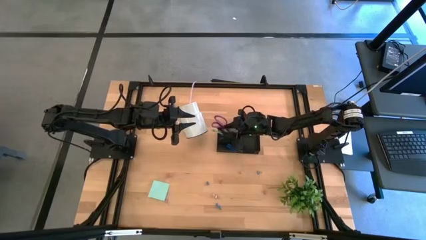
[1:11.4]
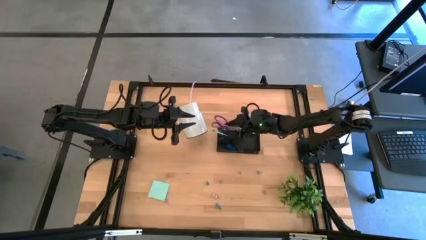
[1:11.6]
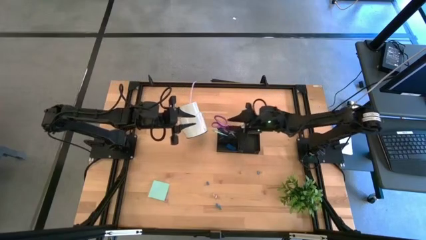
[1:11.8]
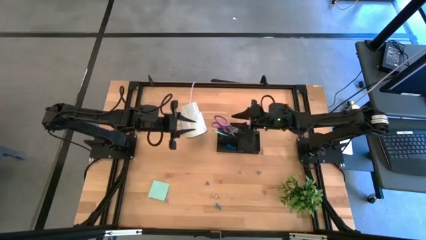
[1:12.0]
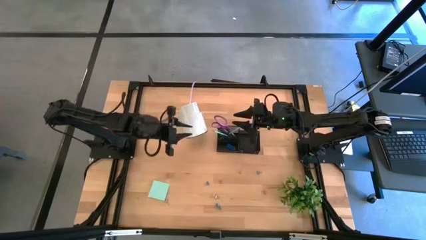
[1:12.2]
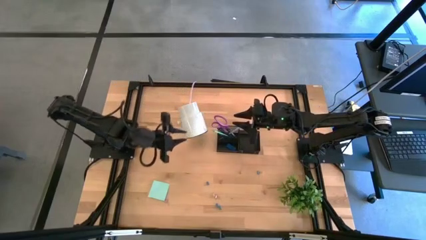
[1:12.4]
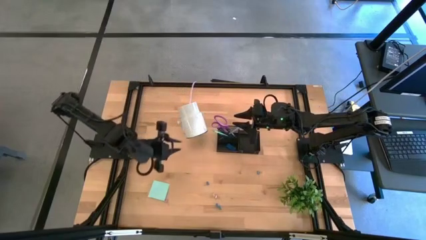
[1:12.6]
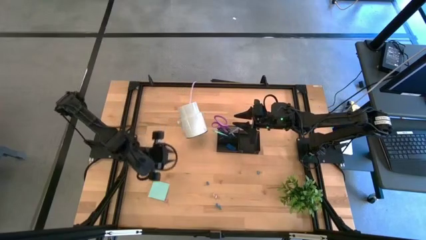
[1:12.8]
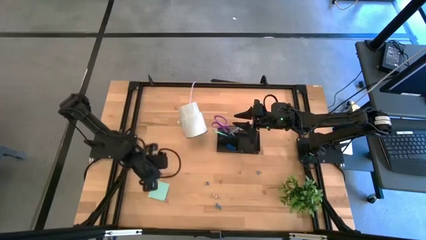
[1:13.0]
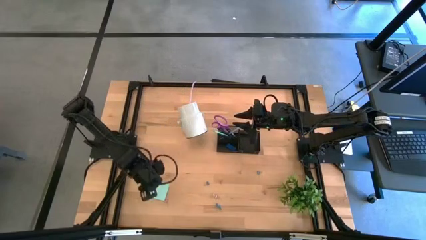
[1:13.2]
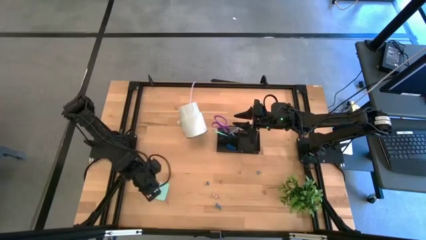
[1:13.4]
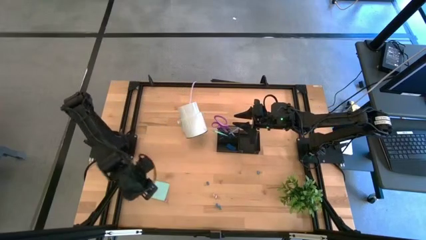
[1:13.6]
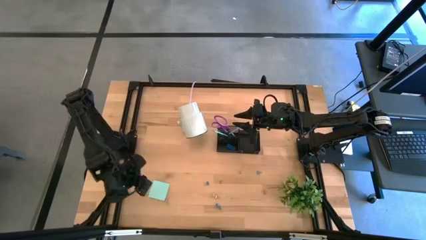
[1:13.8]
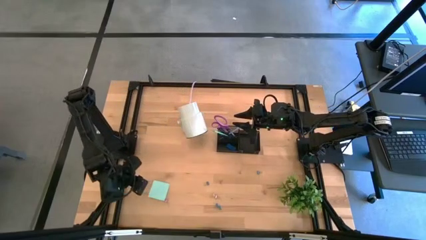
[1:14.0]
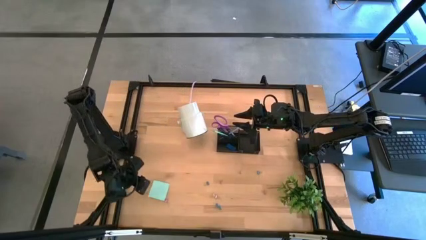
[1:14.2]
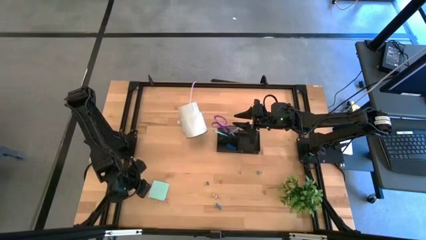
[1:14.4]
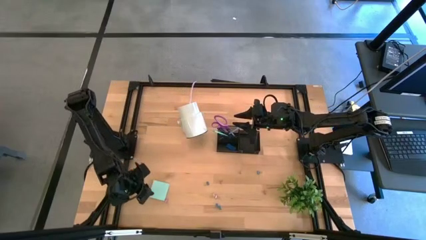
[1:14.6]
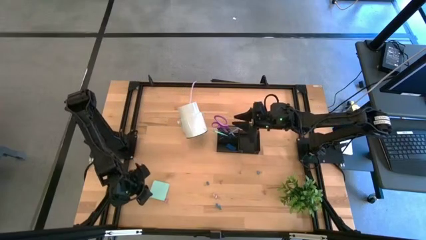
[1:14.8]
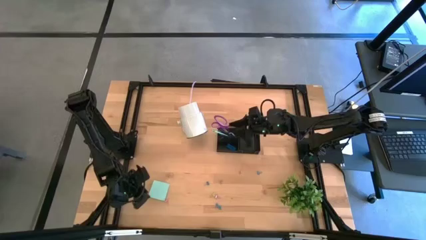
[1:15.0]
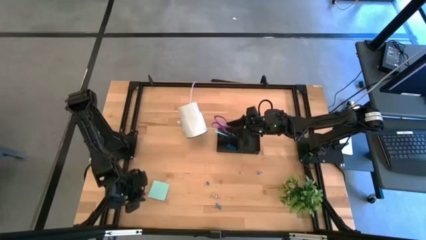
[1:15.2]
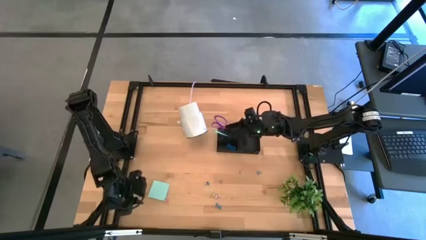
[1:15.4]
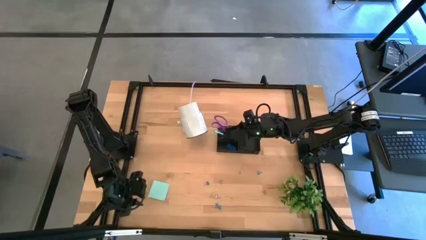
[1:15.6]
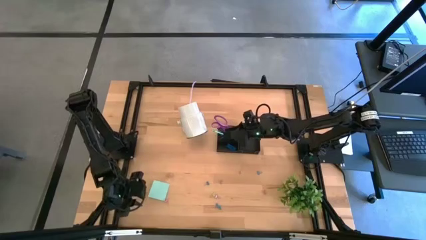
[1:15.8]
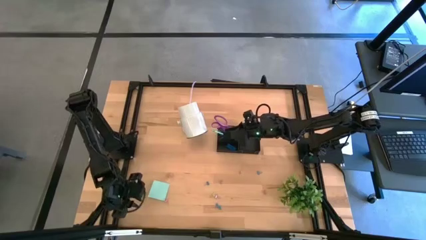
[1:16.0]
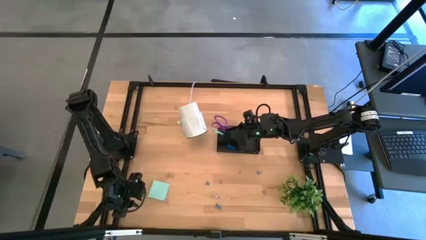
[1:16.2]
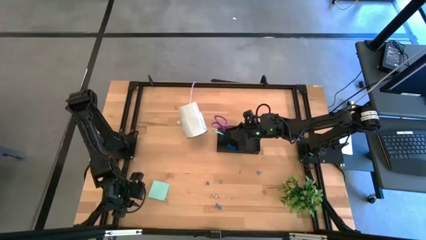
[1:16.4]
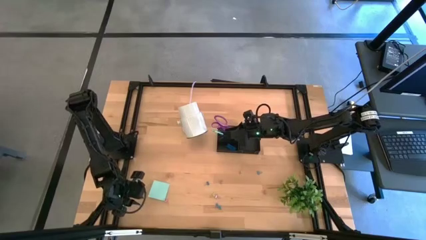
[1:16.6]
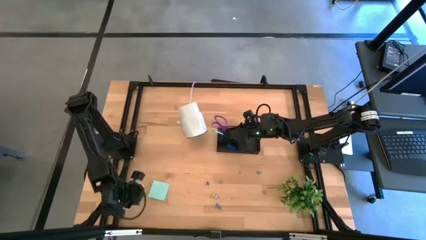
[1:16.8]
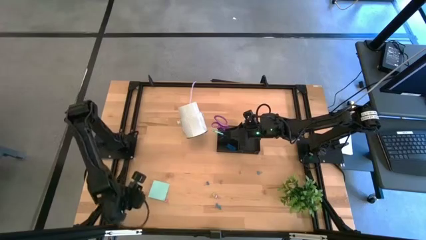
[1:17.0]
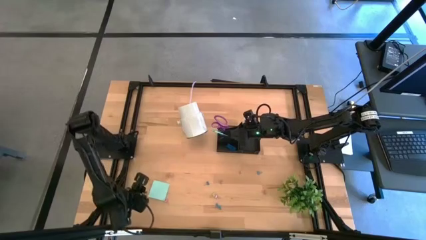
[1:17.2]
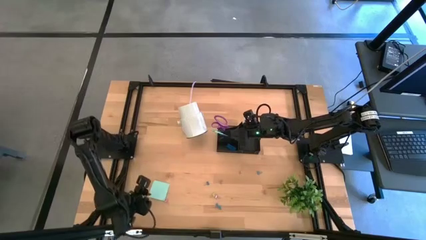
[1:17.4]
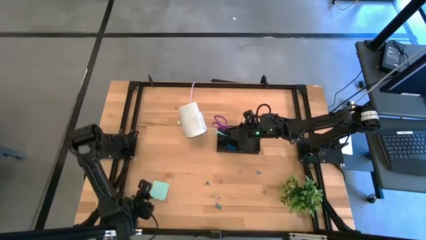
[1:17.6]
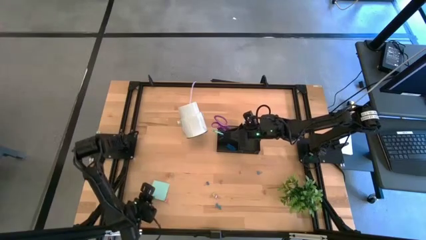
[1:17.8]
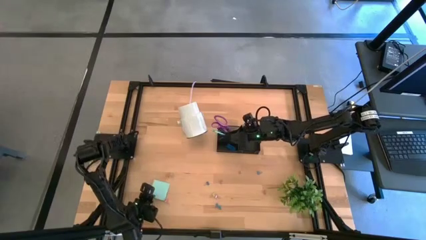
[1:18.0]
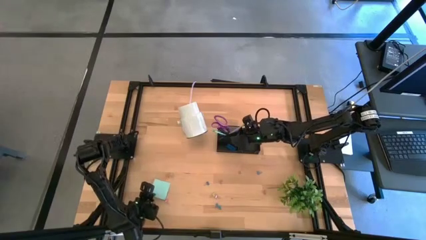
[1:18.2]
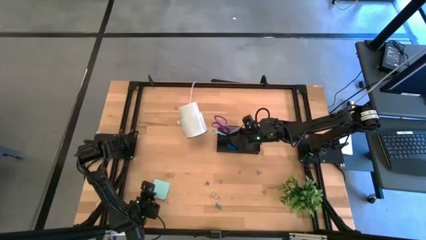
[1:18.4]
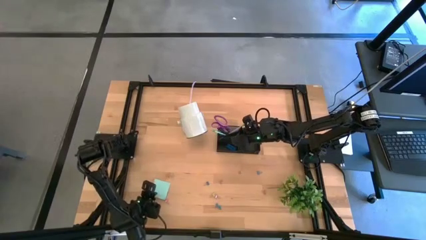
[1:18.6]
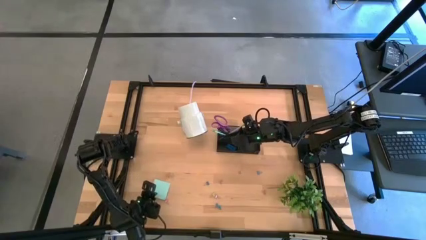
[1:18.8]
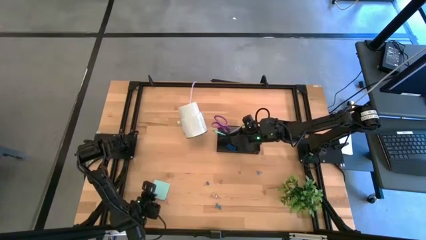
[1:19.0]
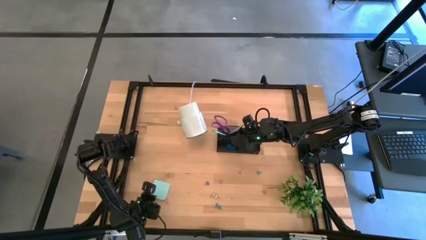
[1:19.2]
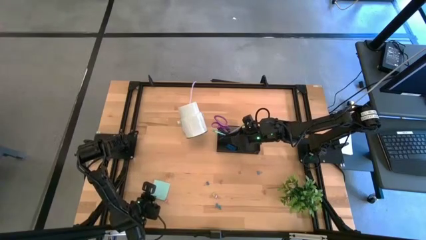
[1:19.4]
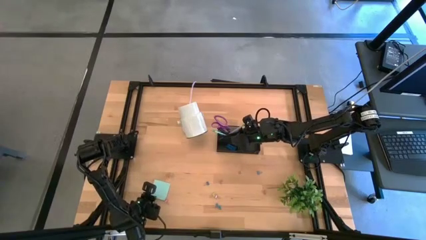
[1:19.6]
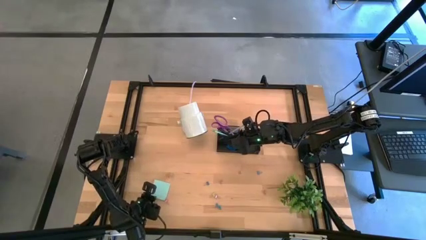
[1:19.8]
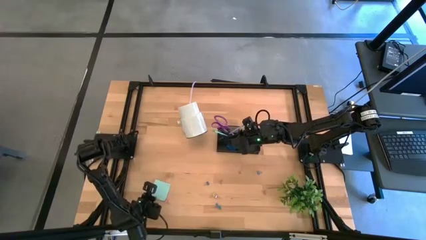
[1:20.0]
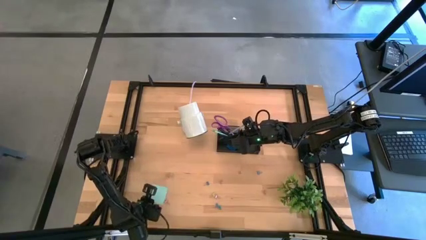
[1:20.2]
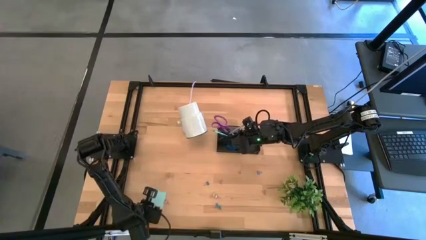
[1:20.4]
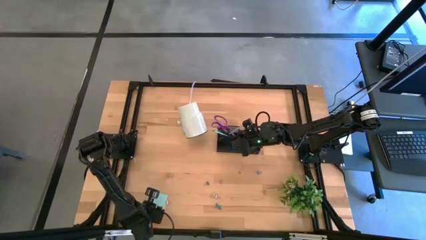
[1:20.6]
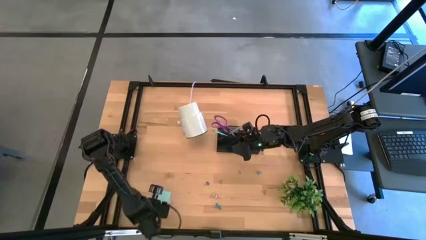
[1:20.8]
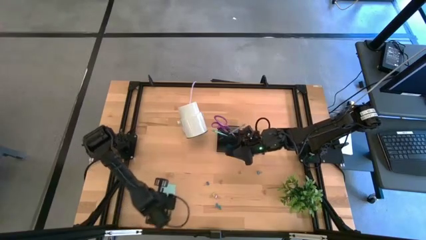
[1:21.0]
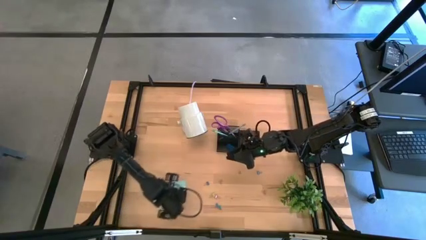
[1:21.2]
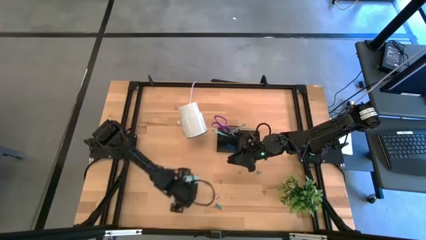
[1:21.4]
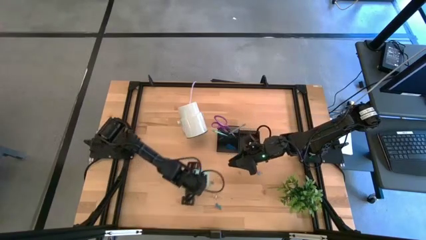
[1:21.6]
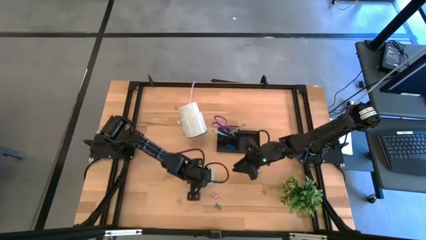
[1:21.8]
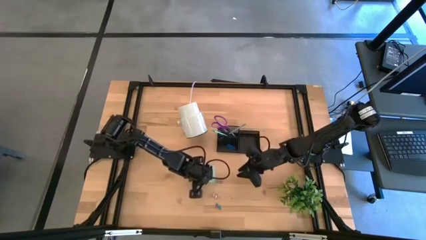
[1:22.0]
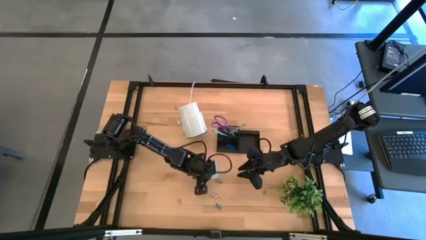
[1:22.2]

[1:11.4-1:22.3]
Task: Pick and place office supplies into organizer
Put the blue sticky notes into the black desk organizer

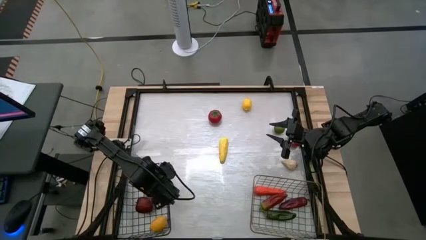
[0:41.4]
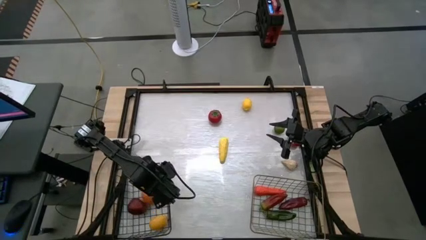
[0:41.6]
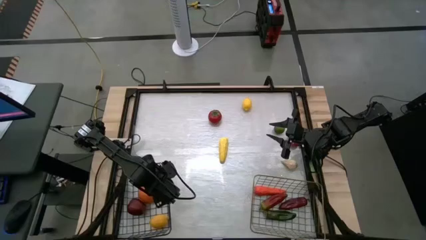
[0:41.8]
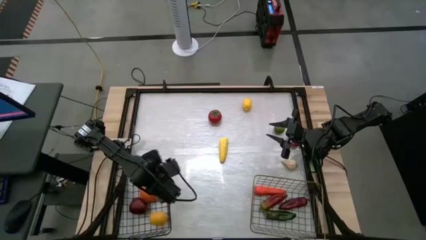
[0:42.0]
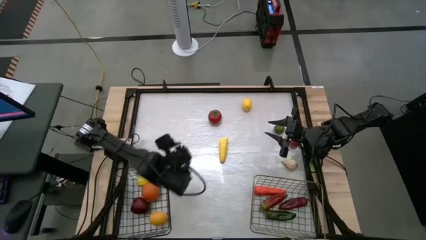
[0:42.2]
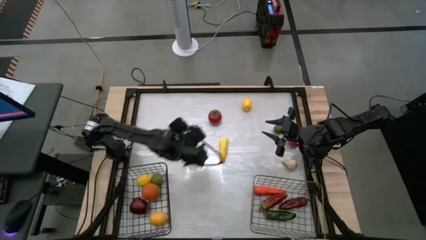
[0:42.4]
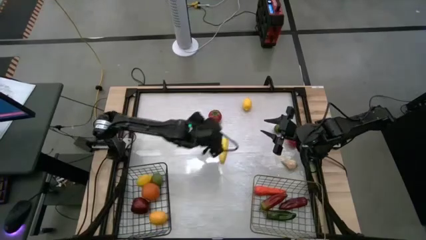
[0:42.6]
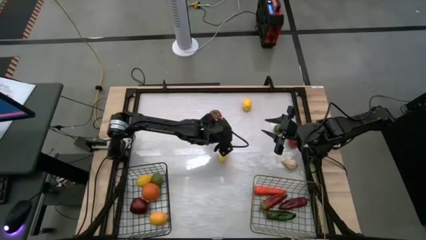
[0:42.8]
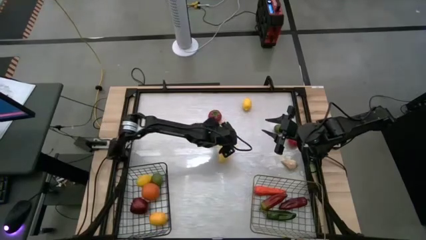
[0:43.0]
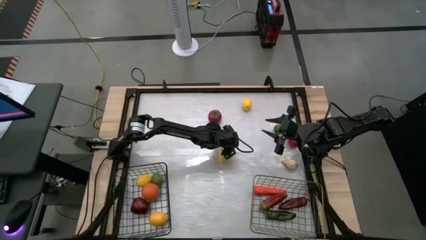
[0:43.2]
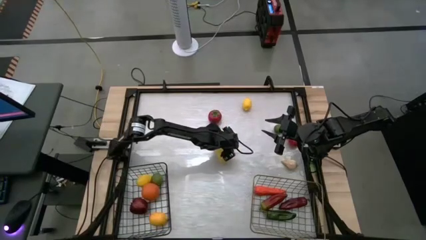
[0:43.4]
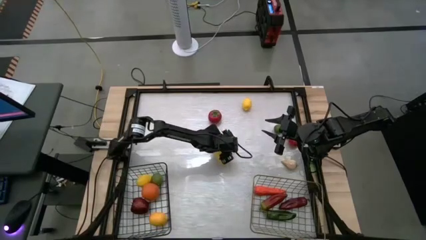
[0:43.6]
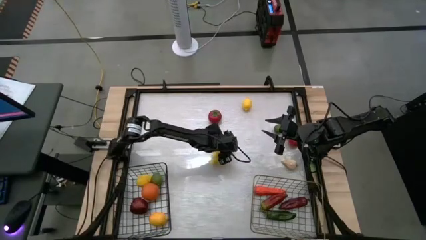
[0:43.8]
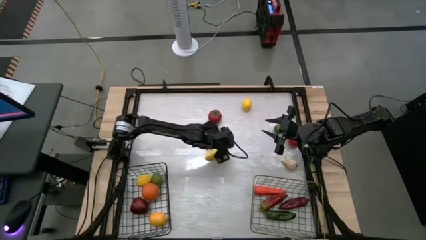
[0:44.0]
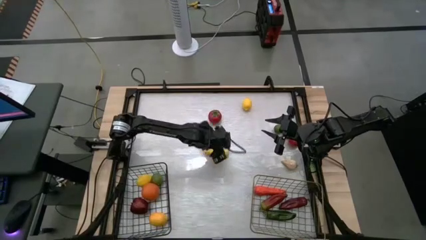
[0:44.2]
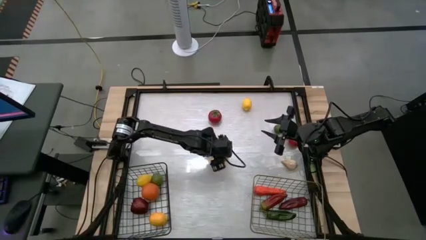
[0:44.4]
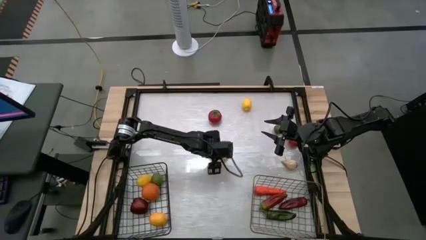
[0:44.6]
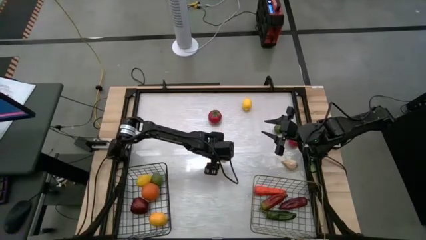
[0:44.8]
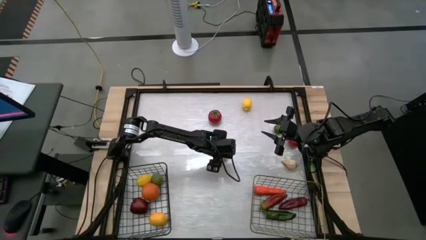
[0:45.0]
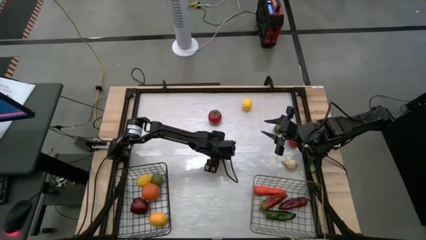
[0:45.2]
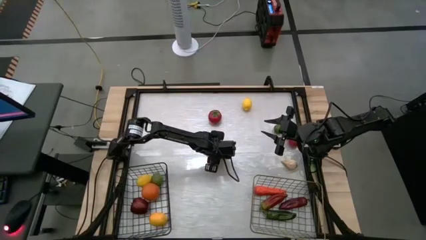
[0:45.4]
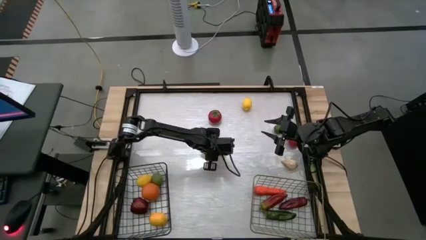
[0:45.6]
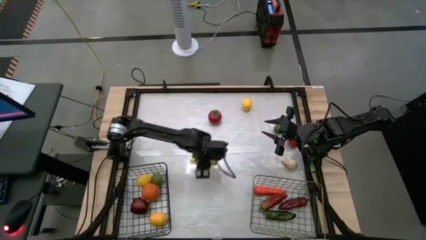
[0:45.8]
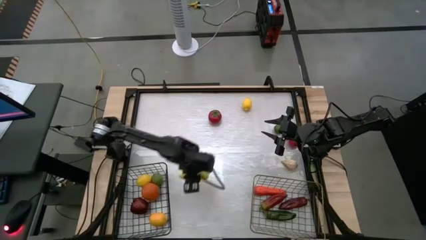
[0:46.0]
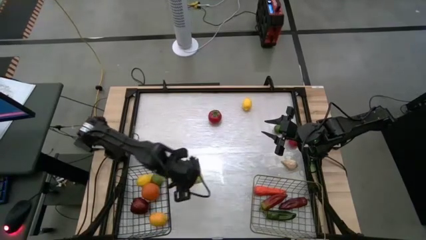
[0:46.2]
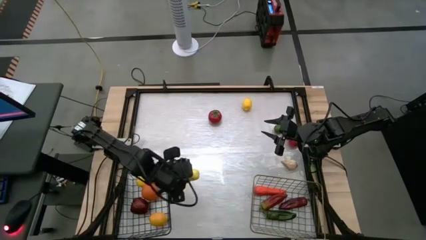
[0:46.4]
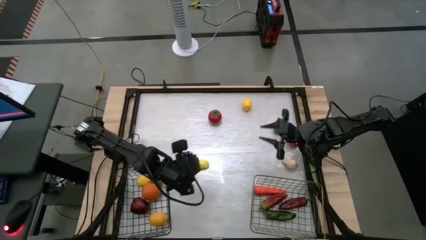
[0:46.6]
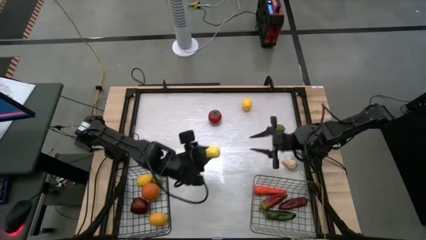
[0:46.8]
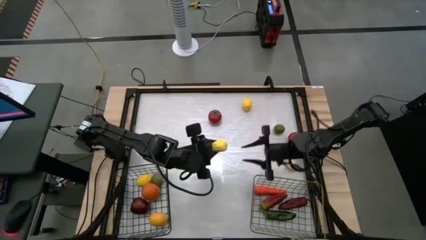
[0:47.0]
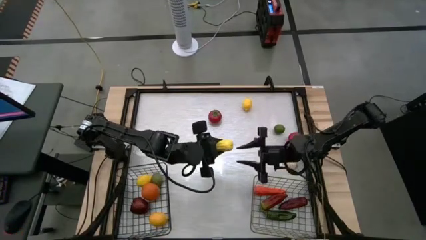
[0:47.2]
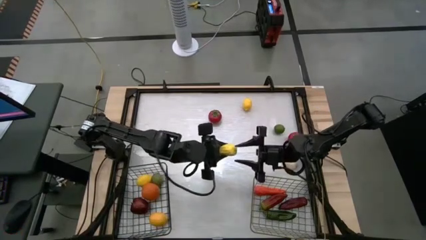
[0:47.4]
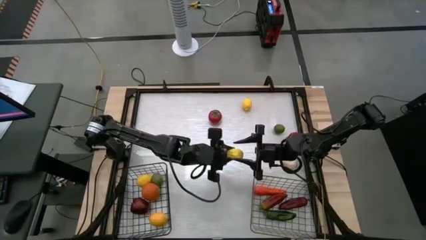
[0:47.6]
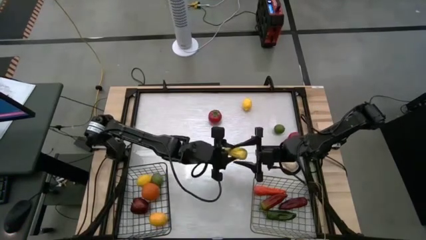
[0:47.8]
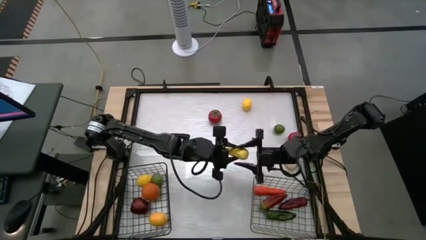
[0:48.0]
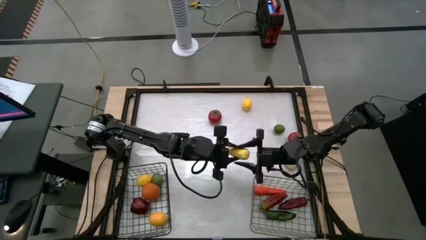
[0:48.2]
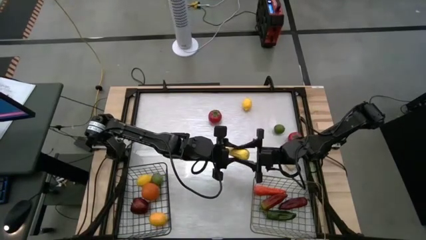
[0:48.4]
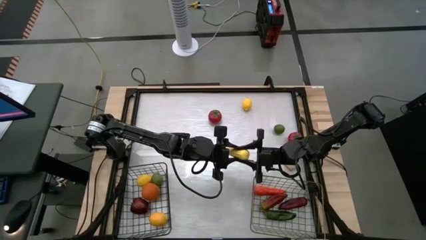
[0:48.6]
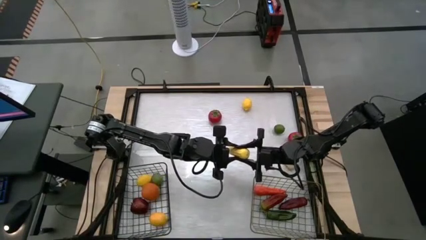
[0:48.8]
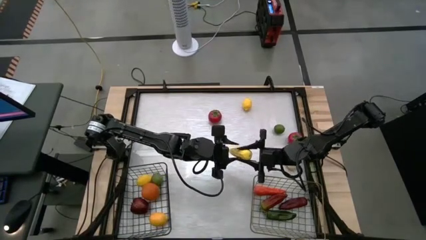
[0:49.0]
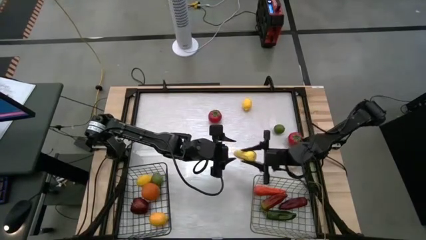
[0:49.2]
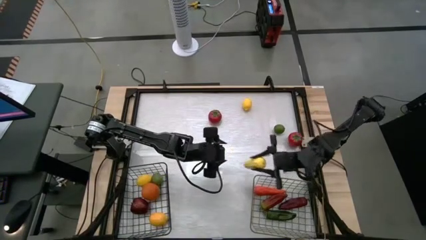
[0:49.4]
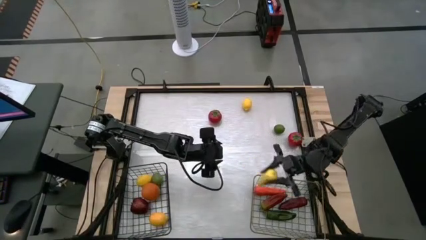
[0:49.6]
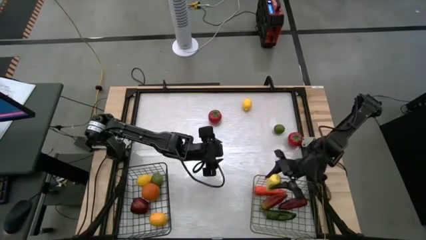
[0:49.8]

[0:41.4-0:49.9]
Task: Sort produce into baskets
Put the corn into the gold wire basket
